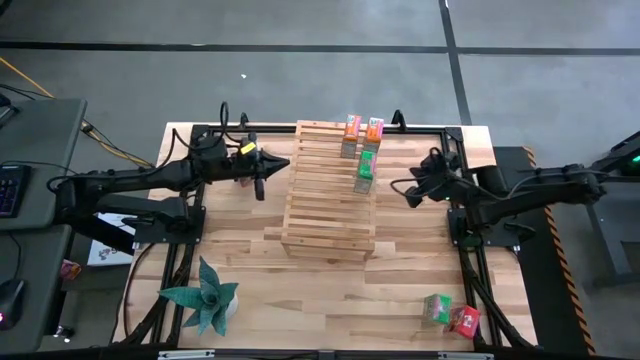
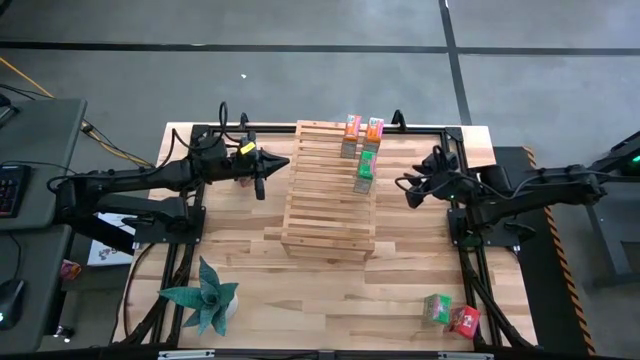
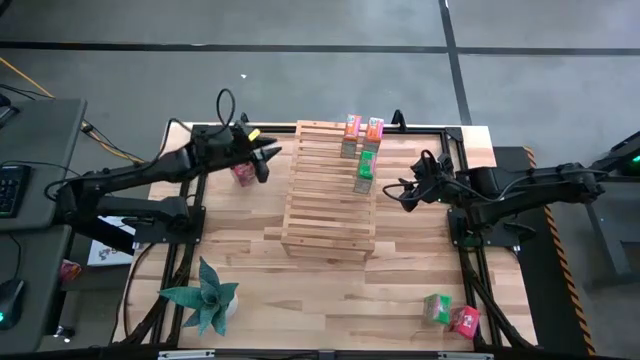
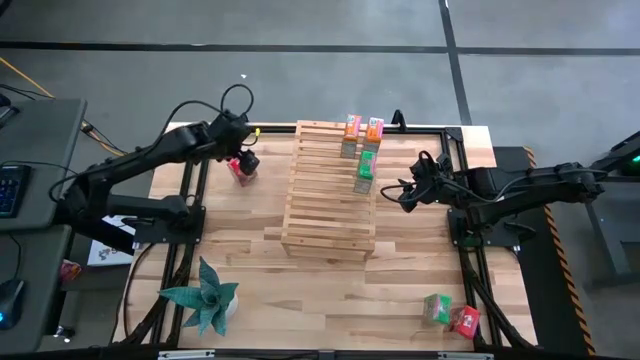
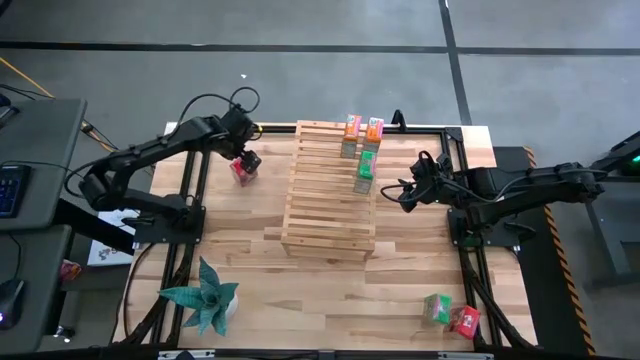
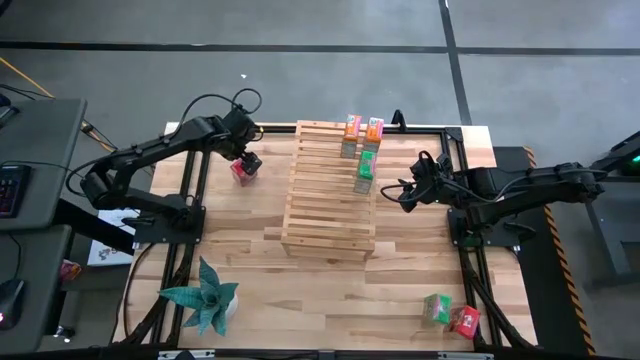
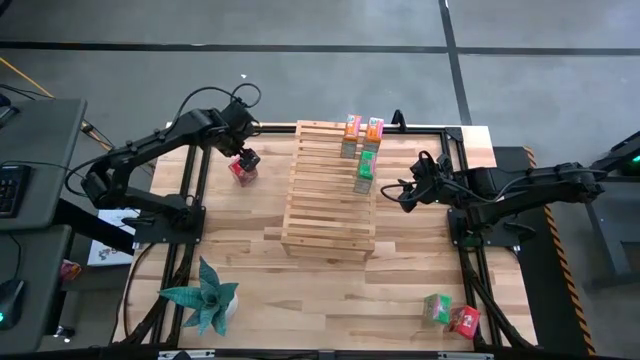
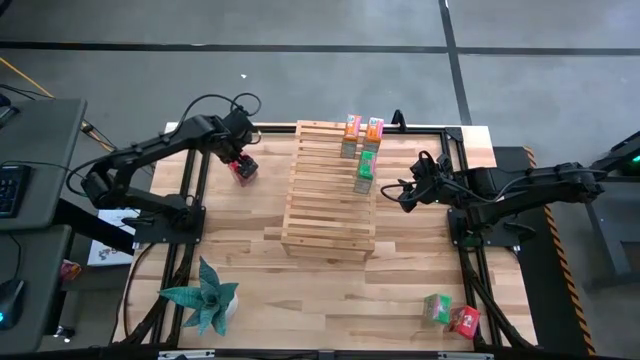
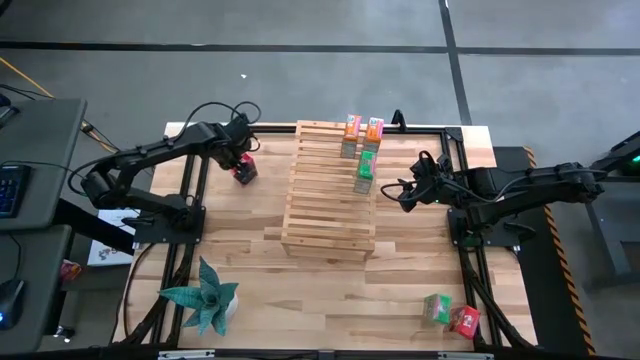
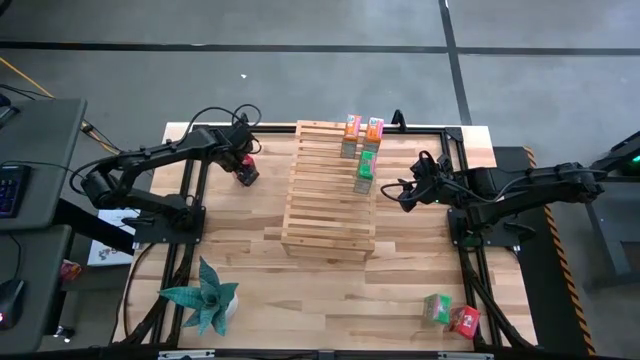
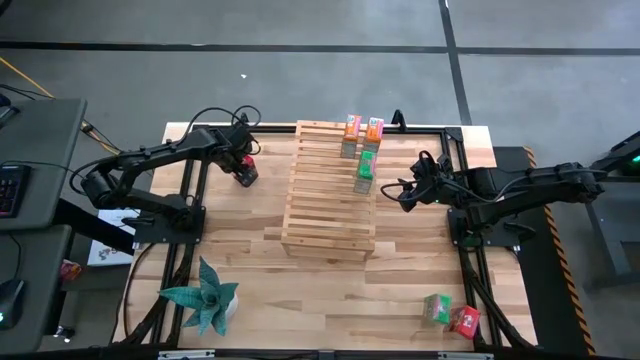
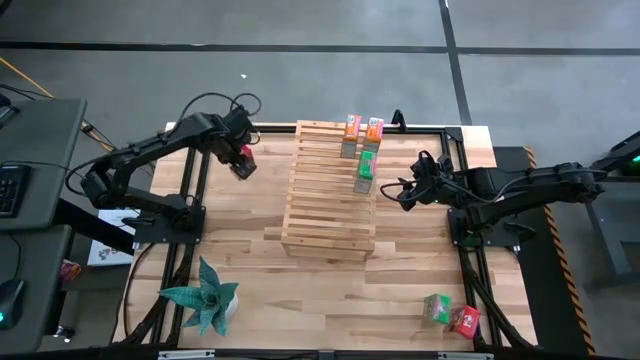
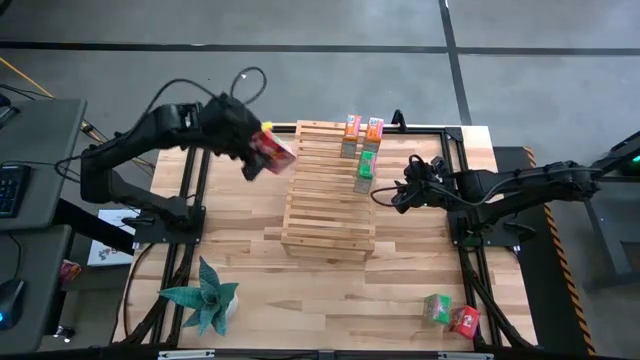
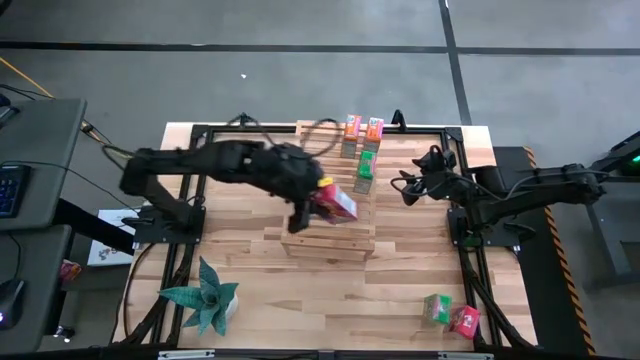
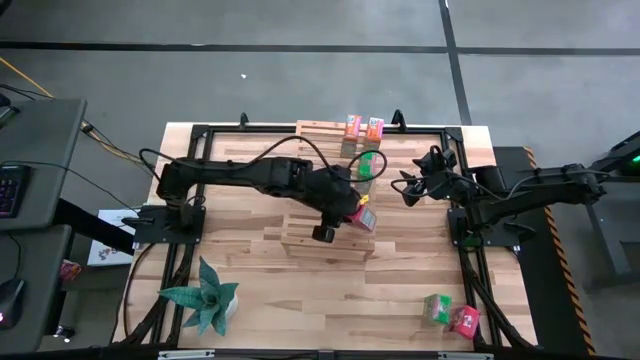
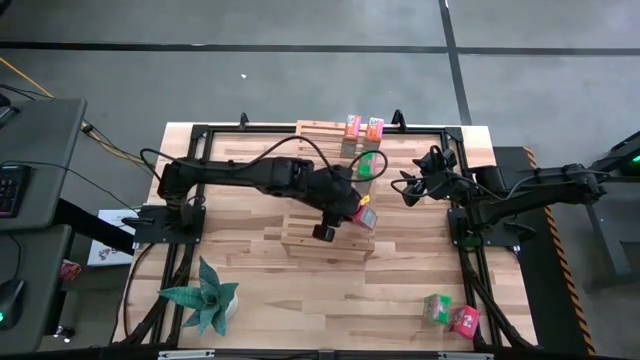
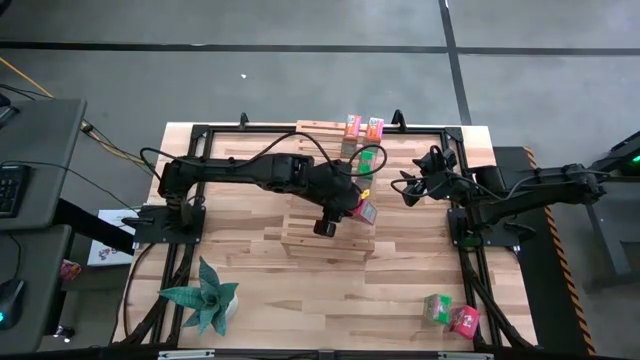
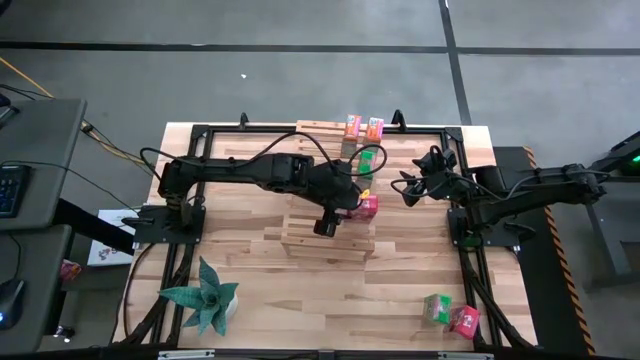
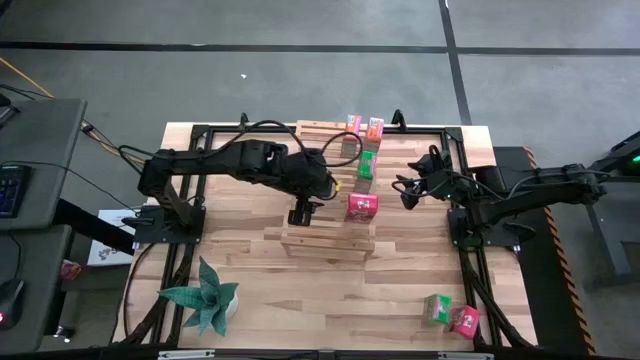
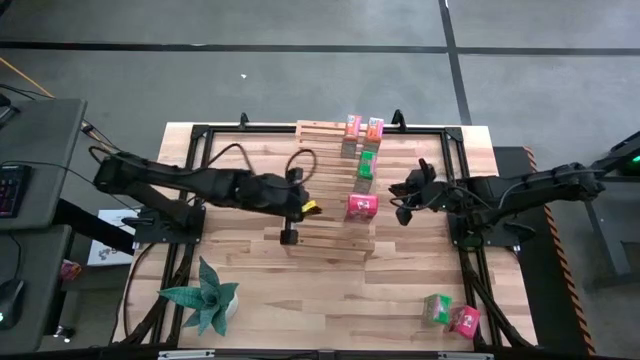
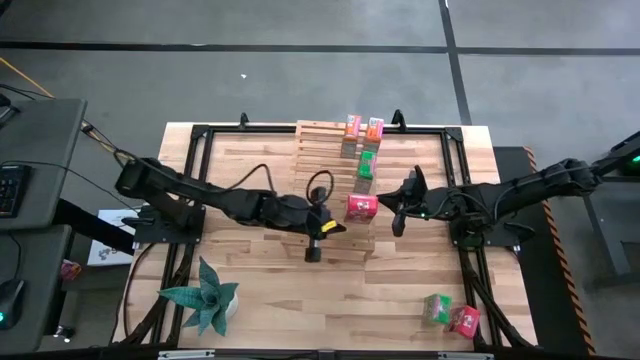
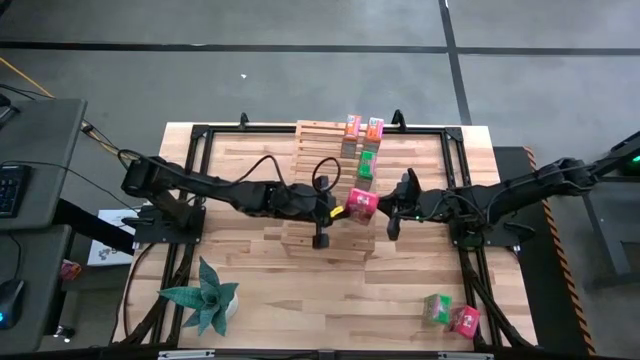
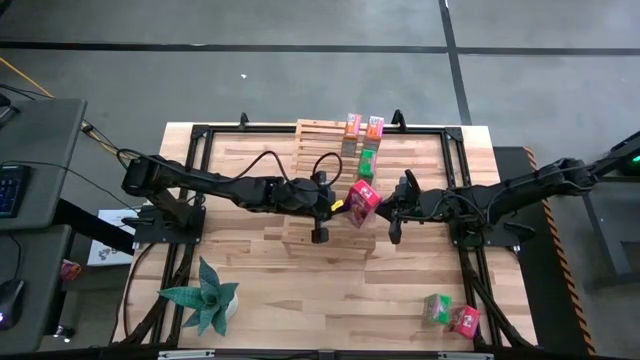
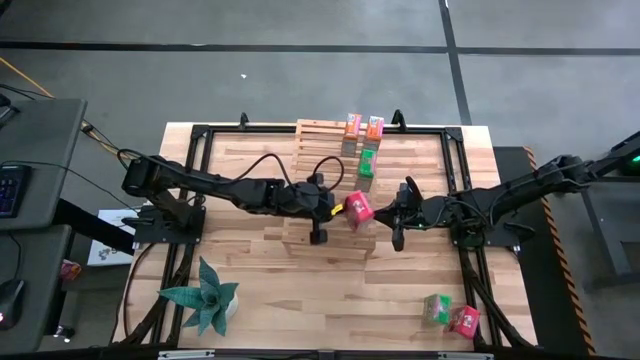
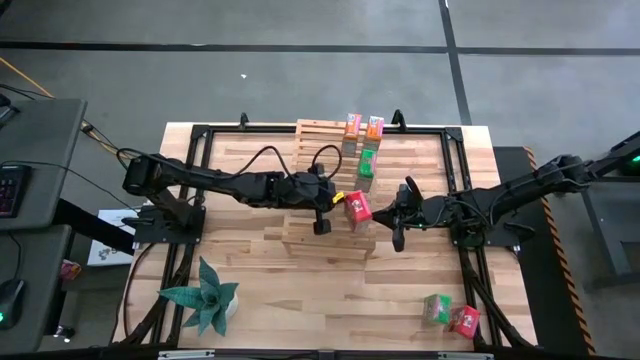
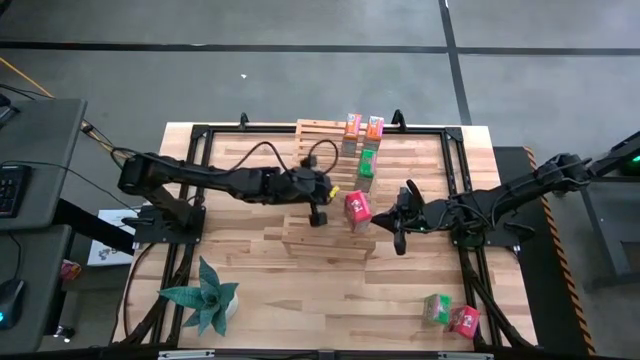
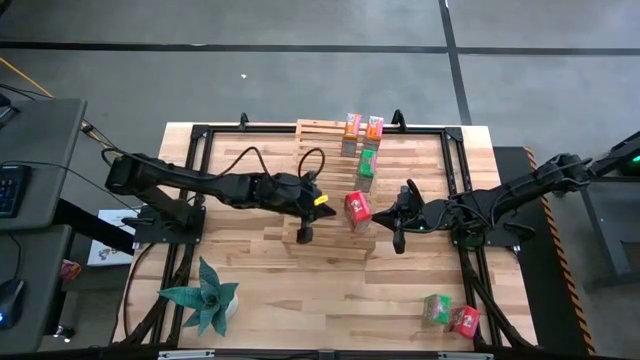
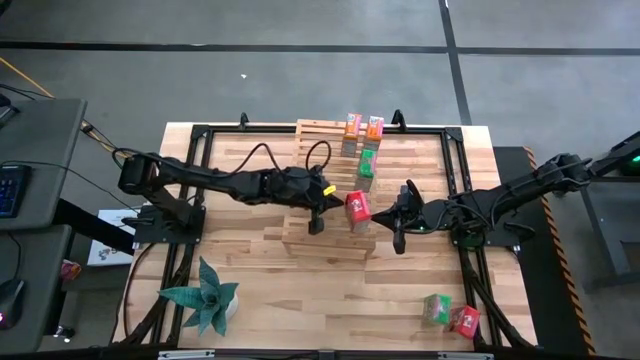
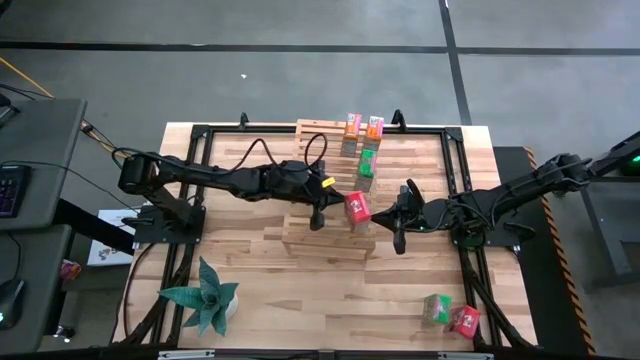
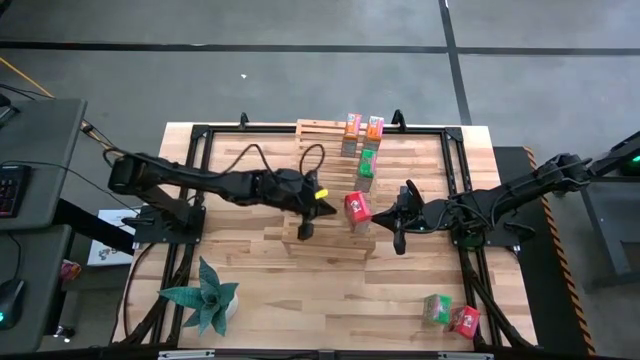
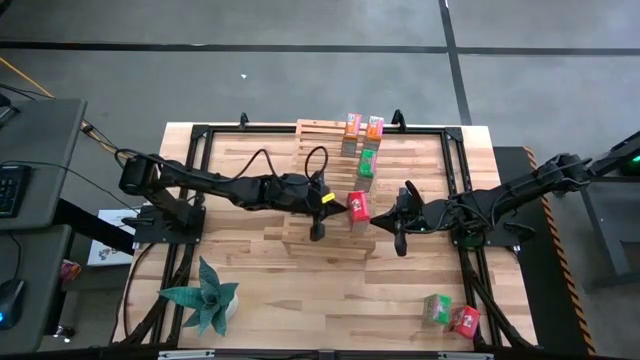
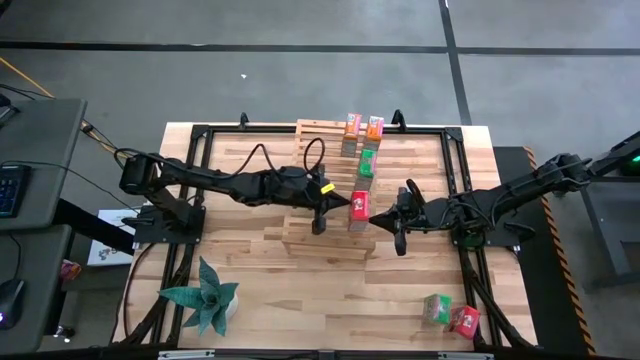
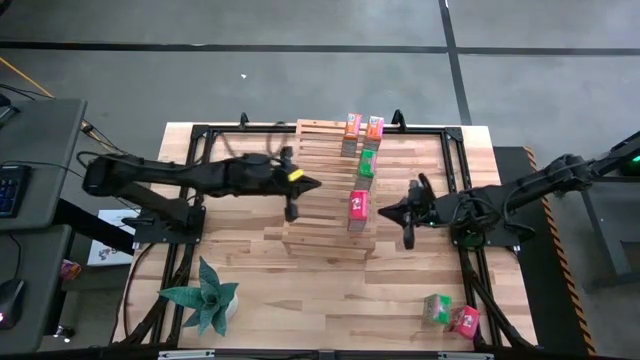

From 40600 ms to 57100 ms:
Task: Stack cereal on shelf
Put the top left red cereal box on the shelf

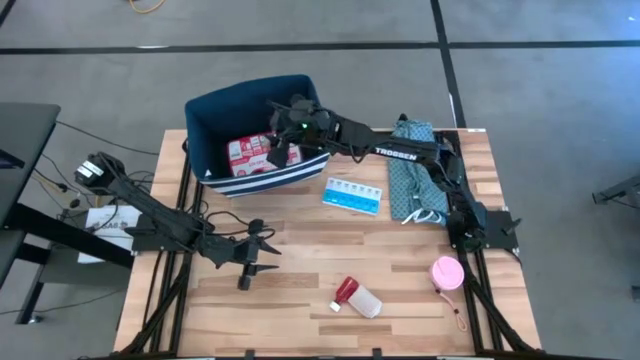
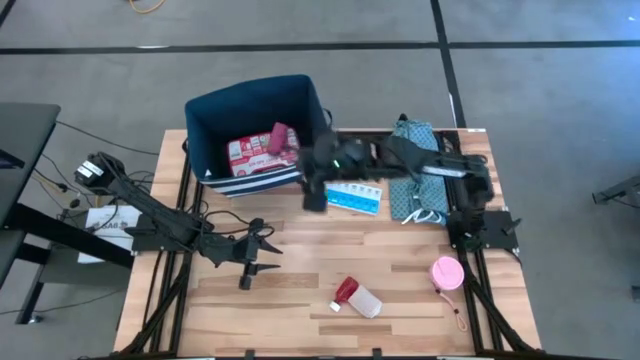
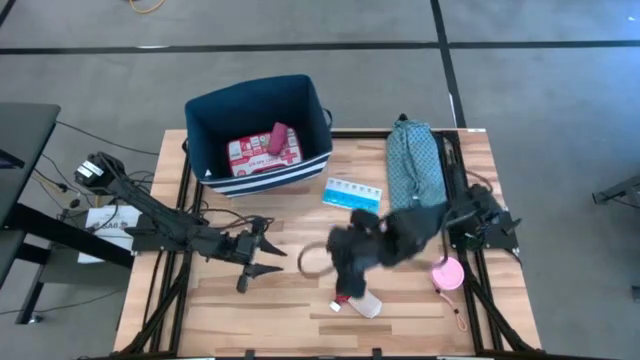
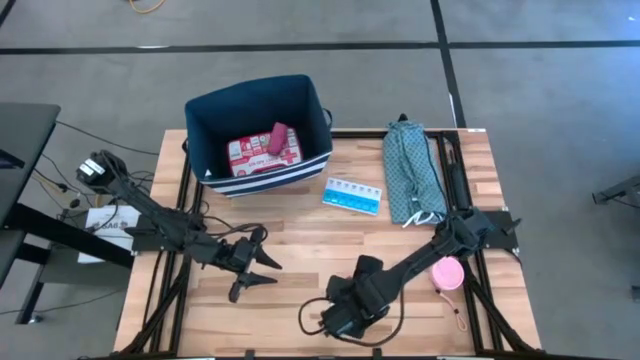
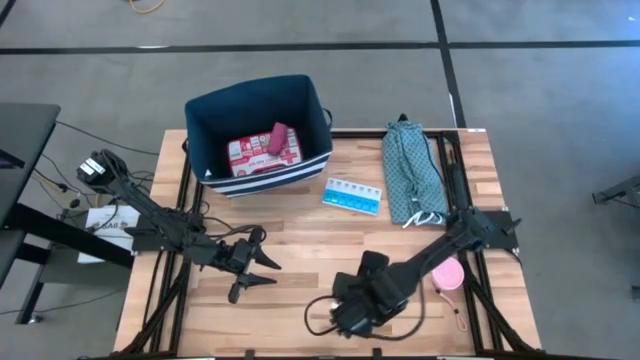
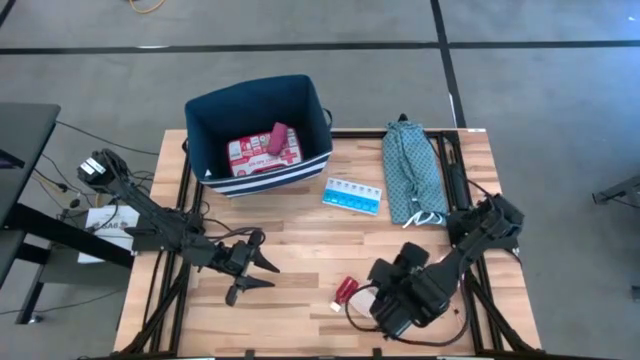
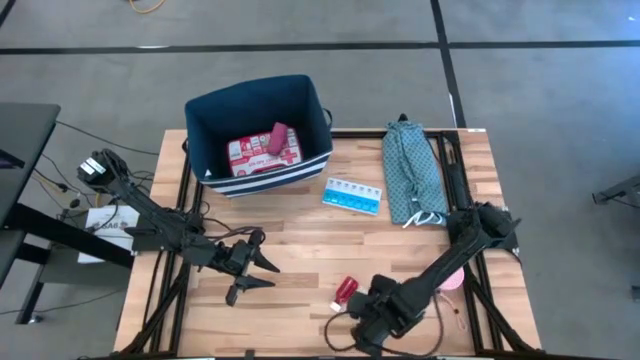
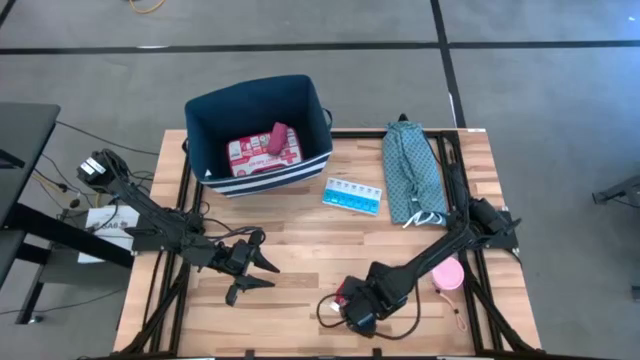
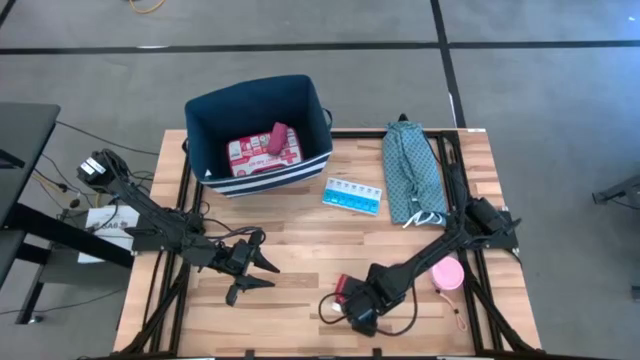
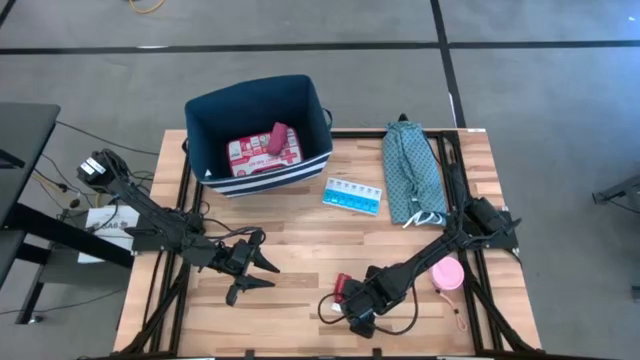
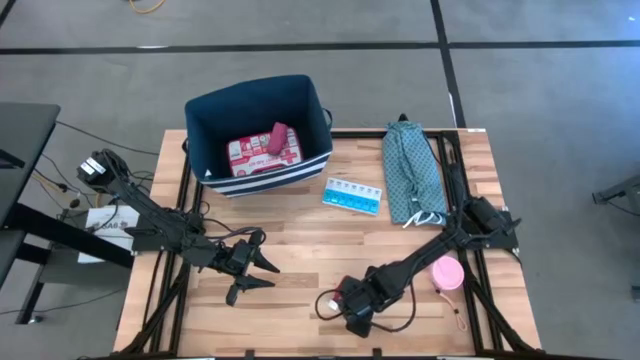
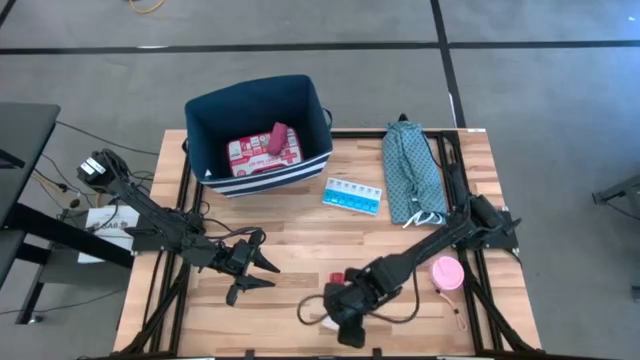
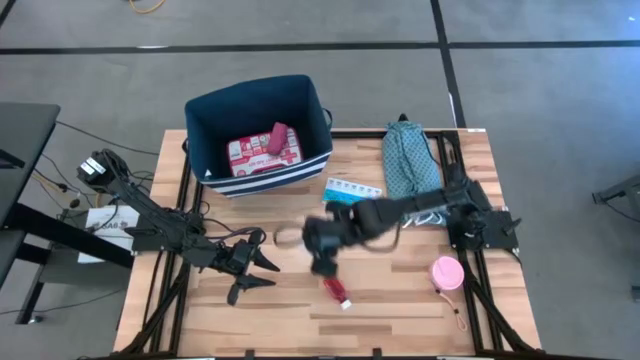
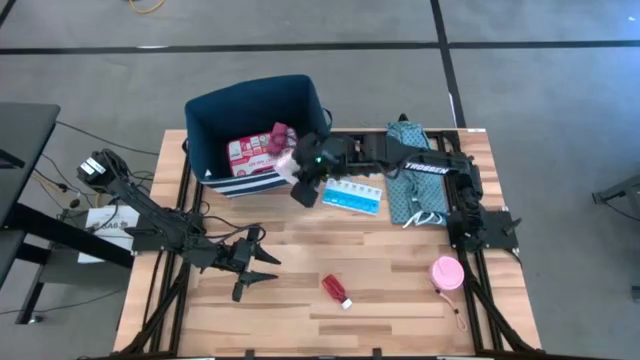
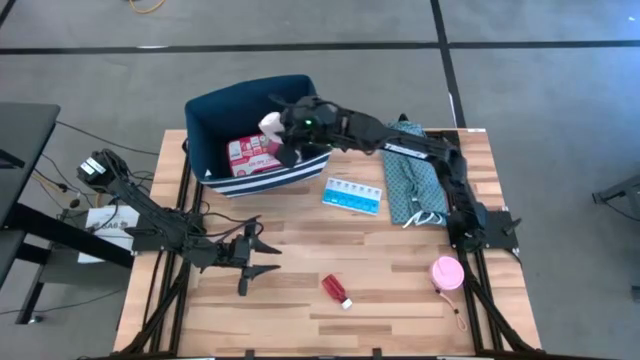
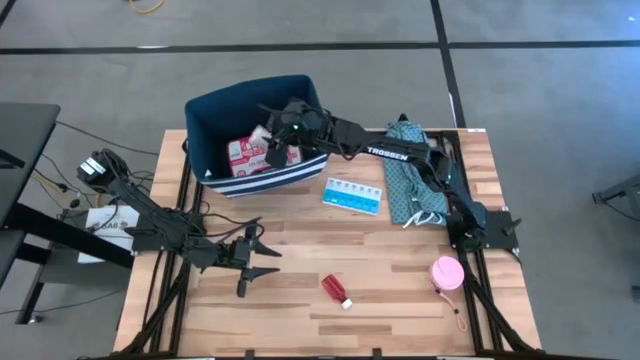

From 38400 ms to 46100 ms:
Task: Pick & place medical supplies in basket/bin
Put the light brown bandage into the blue bin
